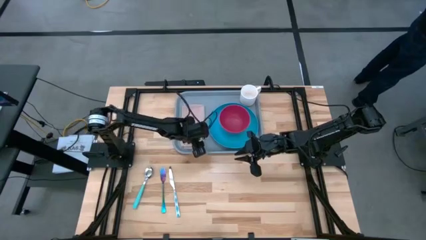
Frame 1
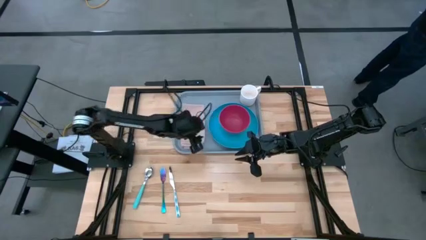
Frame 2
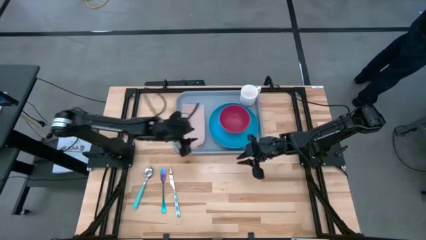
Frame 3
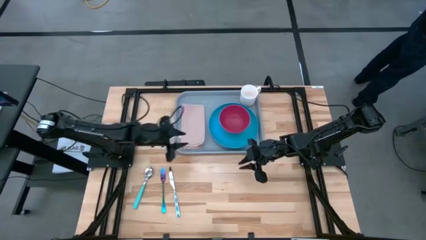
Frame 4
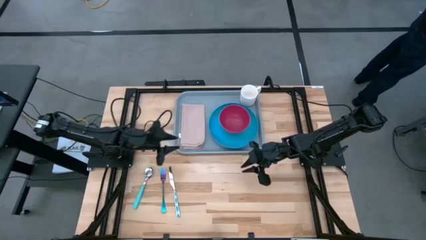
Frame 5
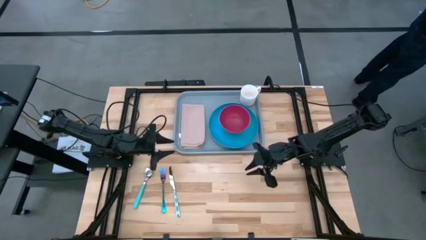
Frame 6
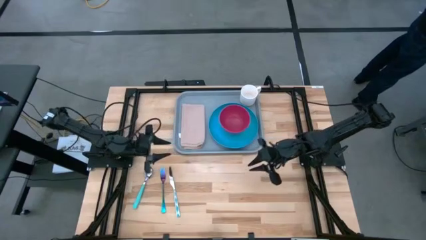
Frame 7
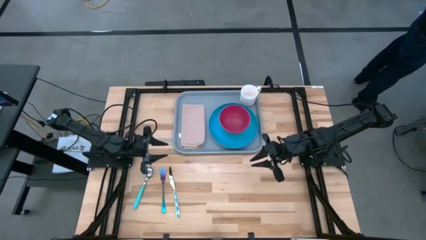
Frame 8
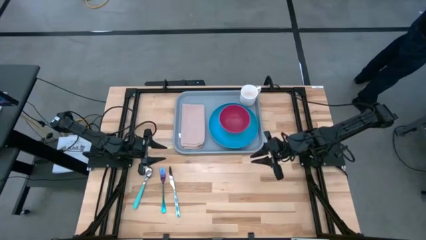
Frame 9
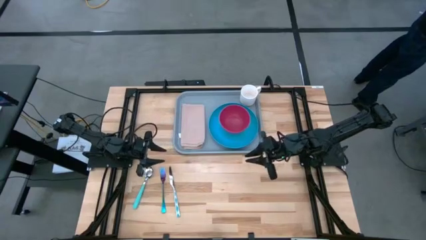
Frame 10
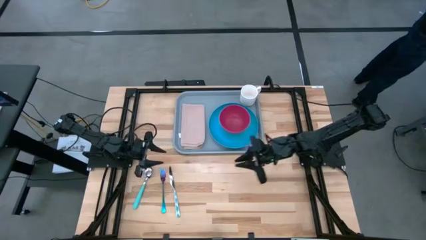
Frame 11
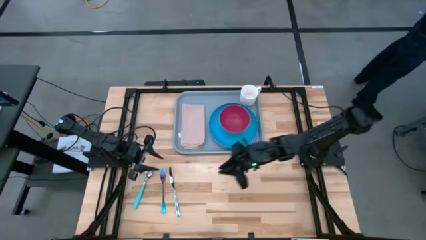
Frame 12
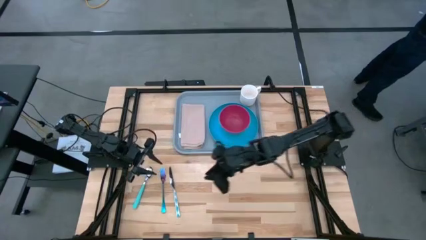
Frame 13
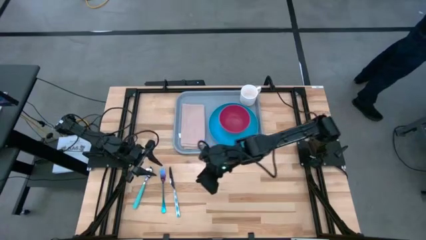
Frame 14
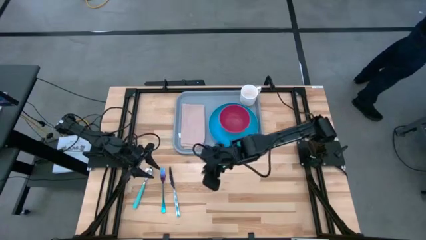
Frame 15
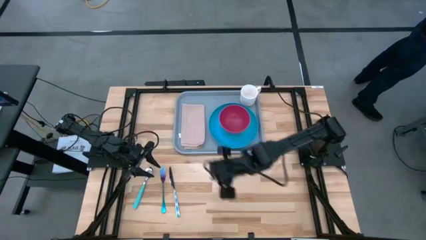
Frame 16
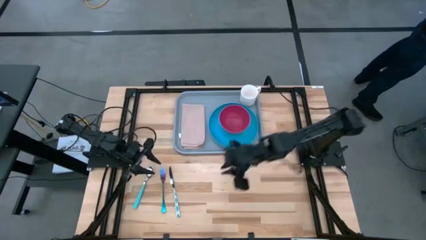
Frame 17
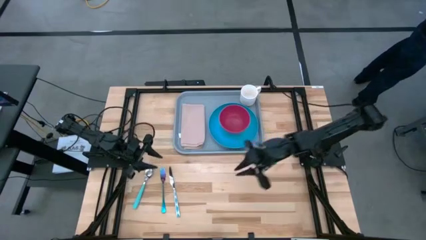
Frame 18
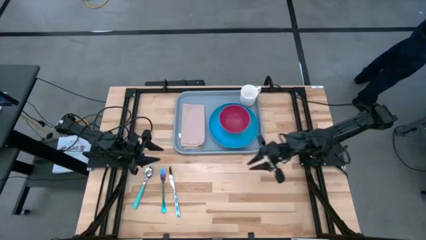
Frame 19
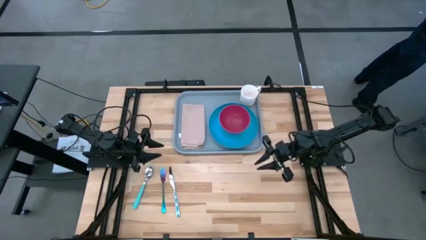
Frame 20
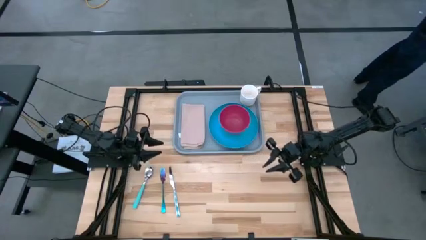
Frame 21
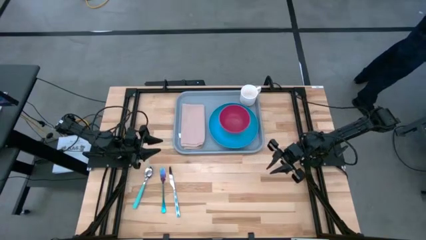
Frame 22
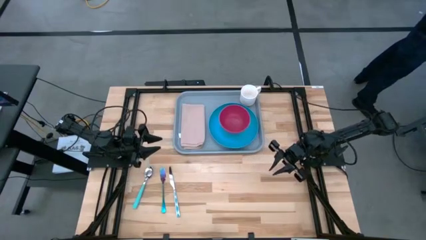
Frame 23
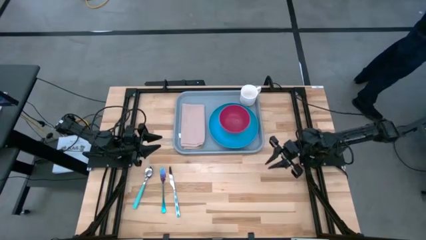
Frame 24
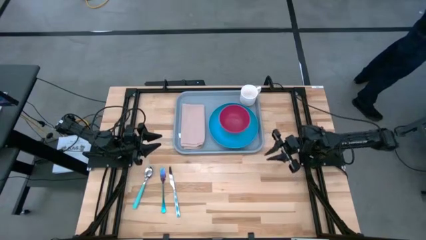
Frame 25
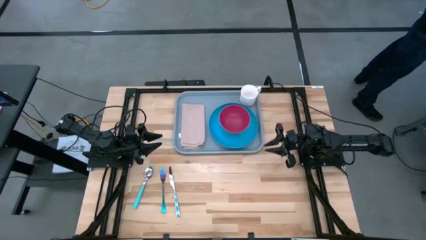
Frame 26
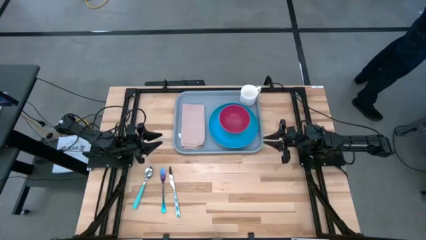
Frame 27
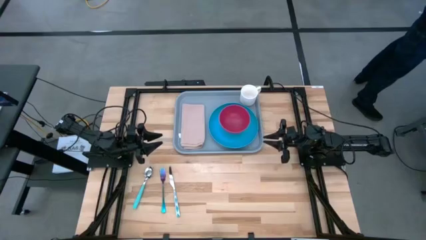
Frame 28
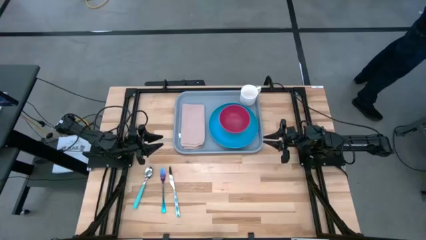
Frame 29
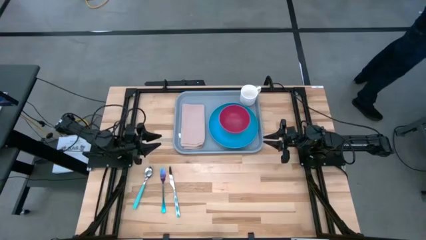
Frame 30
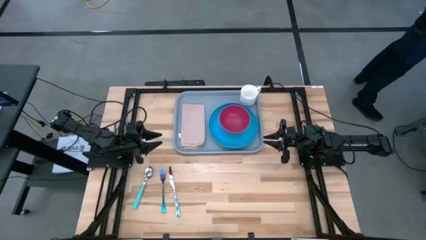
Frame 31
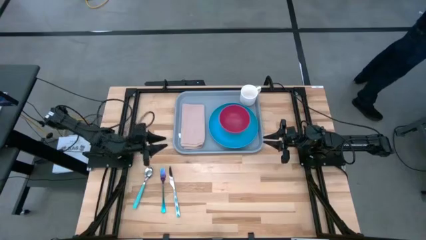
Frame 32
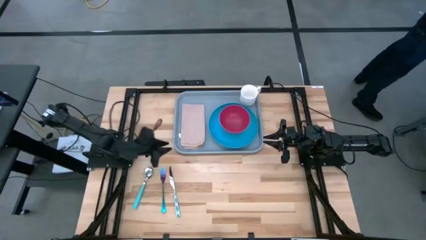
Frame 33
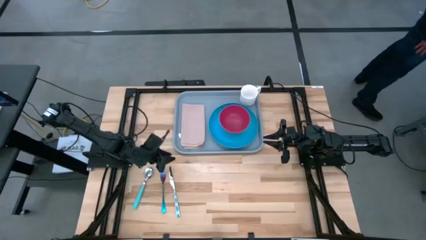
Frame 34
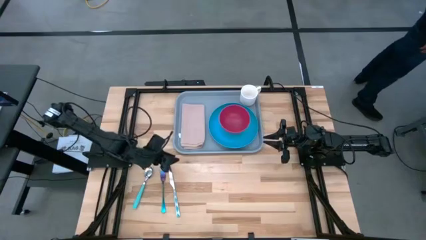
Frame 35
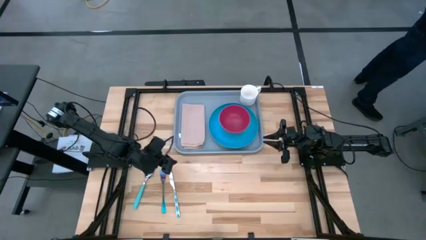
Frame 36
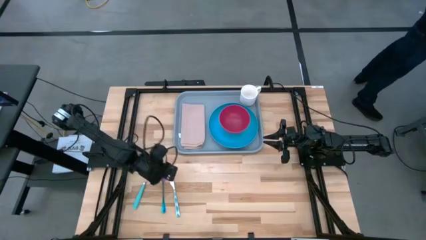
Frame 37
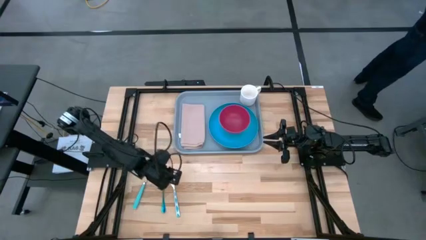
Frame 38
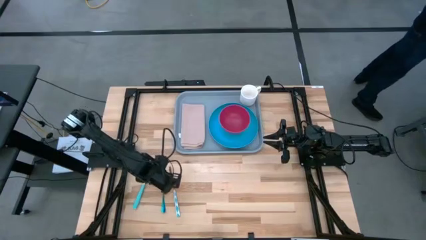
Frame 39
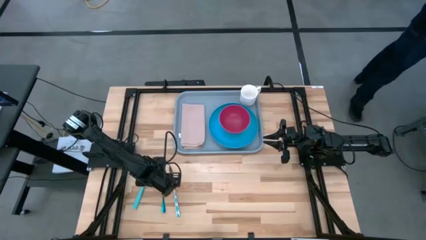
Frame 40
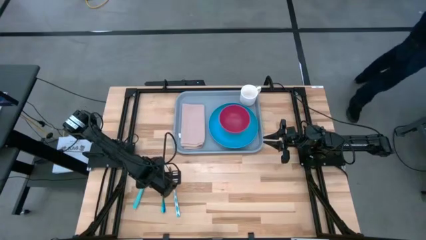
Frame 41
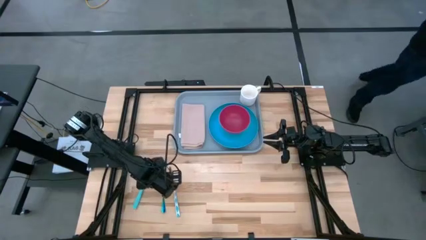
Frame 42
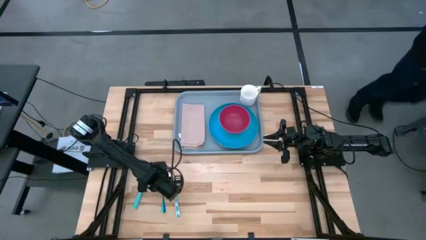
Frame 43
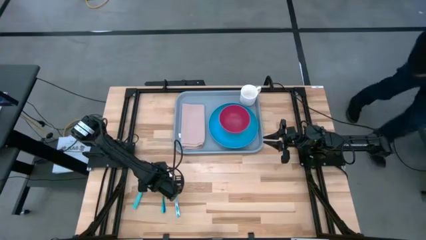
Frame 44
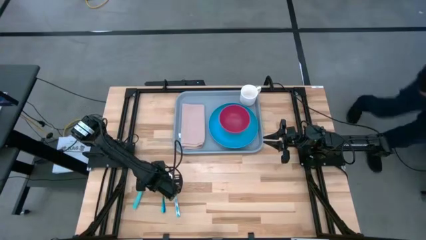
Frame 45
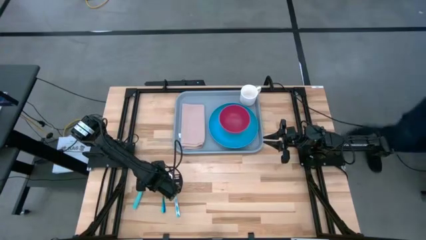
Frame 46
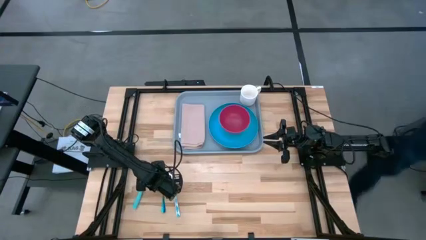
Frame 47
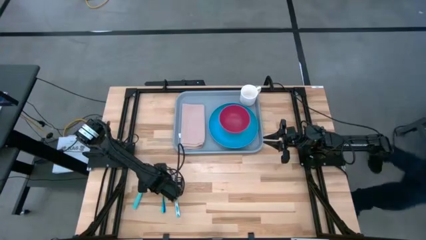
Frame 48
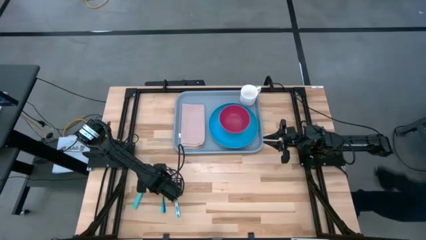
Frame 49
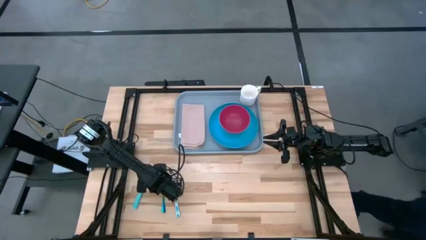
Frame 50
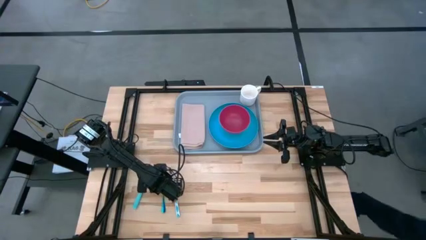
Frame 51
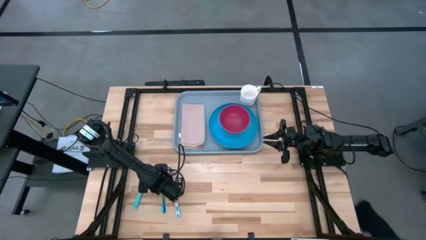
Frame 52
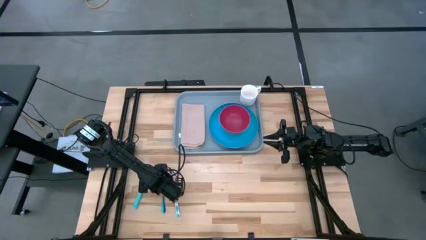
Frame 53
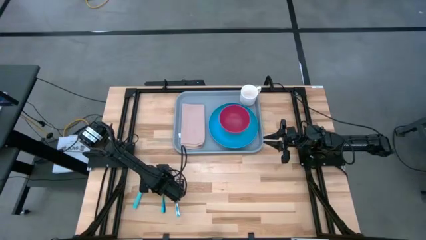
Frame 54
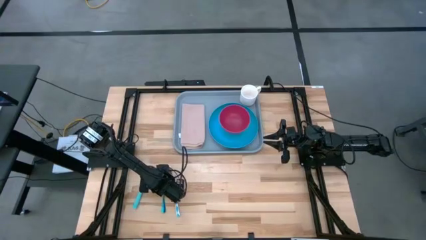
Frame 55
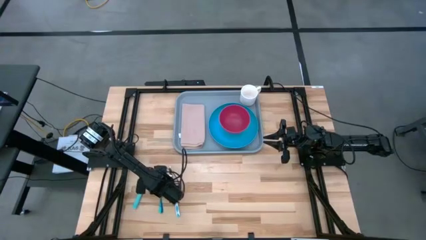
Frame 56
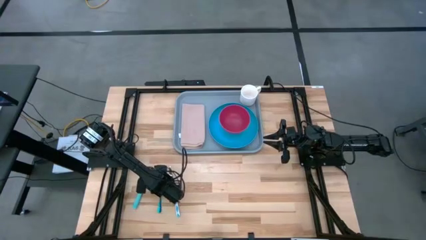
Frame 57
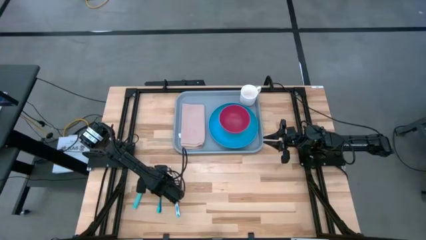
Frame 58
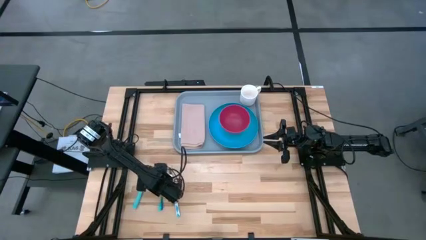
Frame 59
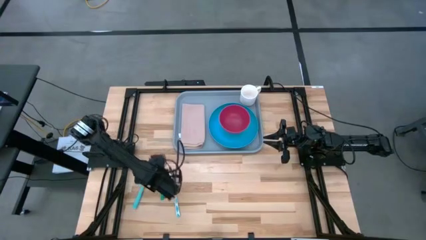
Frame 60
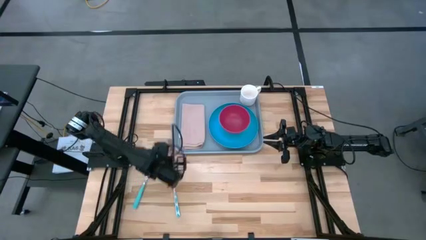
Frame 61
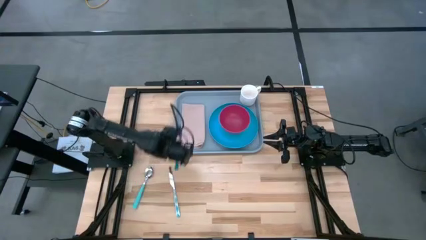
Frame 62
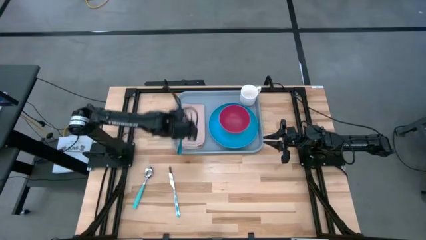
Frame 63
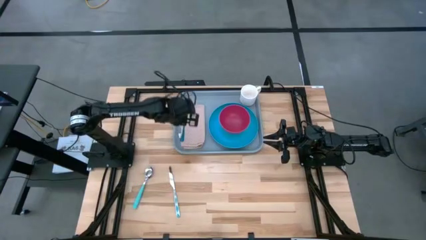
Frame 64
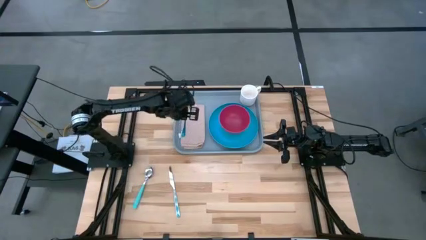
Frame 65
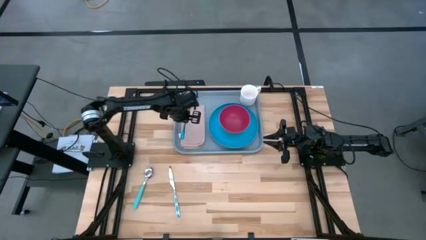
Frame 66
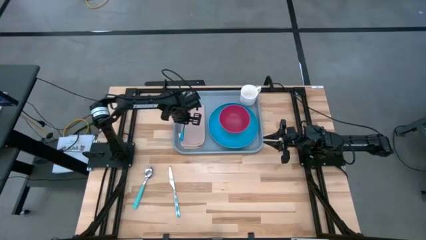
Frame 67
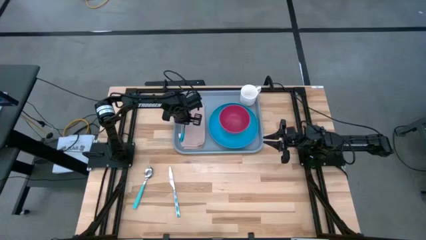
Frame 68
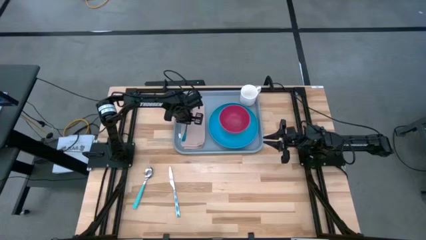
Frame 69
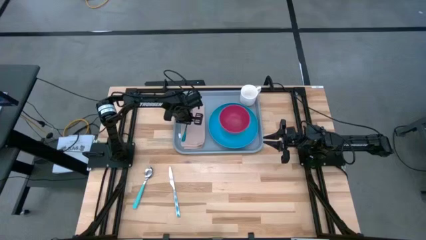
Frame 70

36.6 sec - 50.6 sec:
Task: Set up tray
Put the fork on the napkin on the serving tray

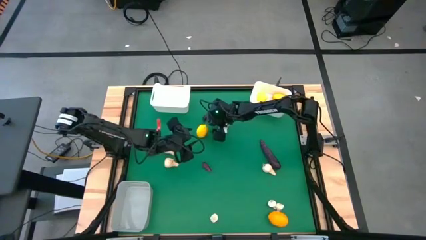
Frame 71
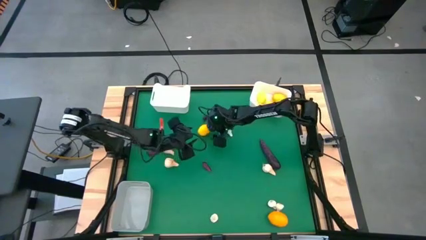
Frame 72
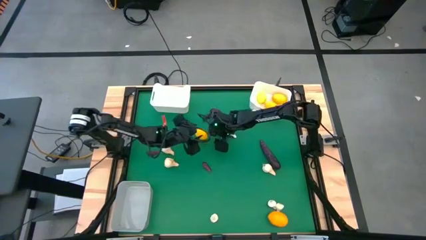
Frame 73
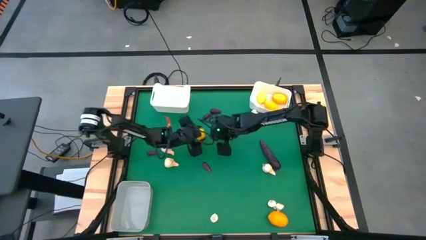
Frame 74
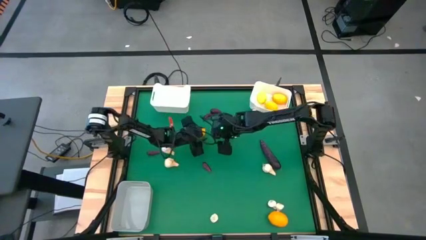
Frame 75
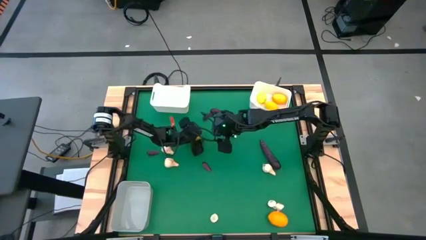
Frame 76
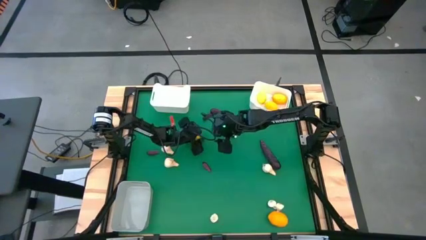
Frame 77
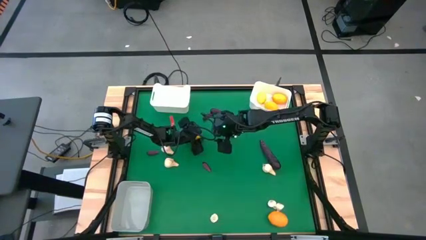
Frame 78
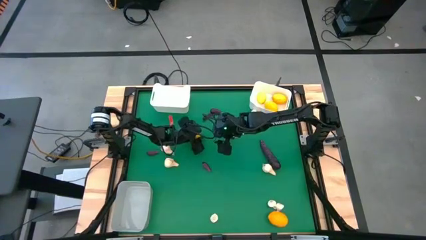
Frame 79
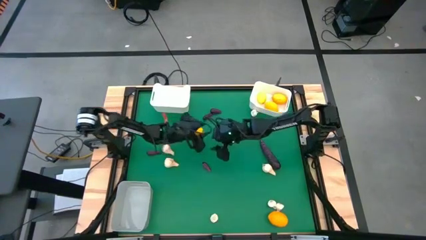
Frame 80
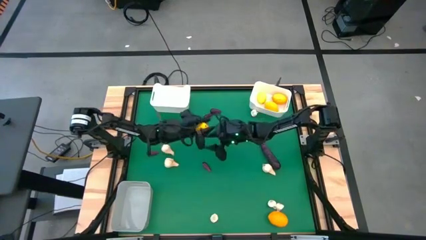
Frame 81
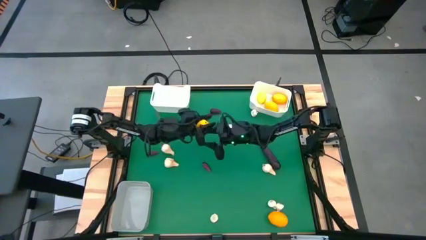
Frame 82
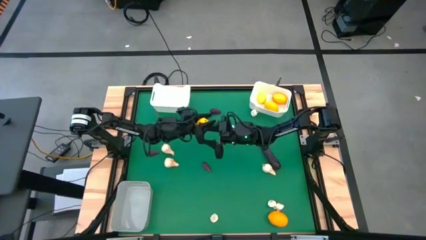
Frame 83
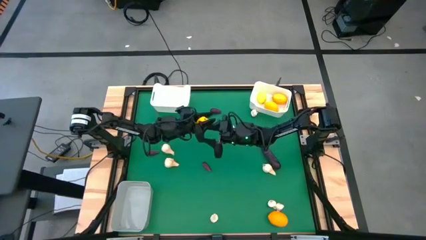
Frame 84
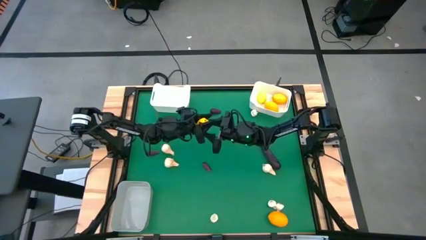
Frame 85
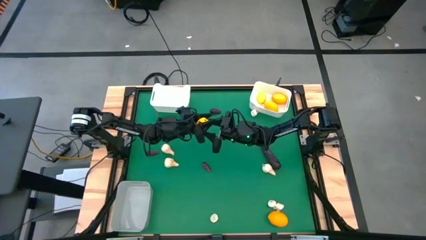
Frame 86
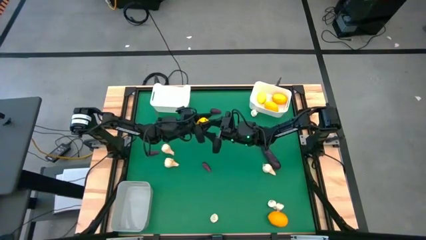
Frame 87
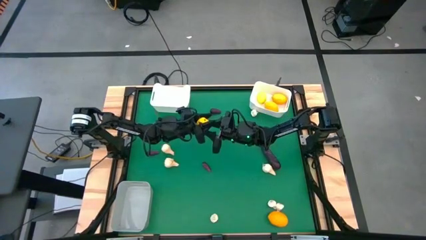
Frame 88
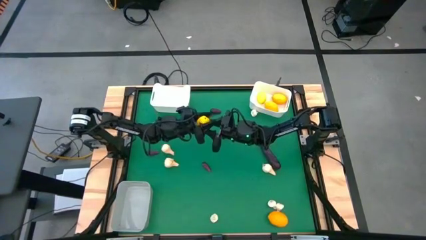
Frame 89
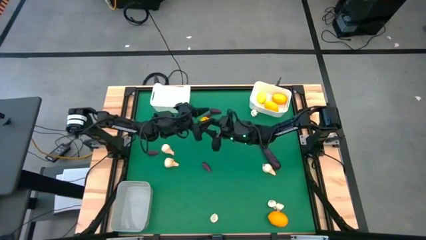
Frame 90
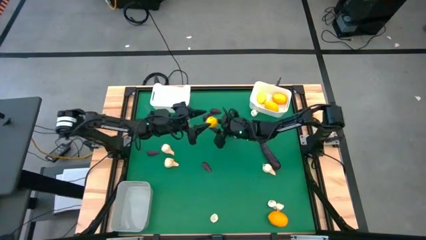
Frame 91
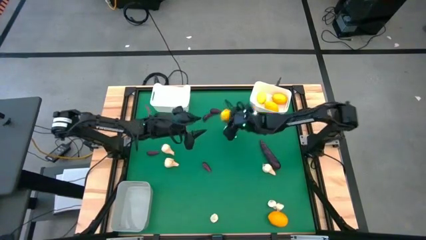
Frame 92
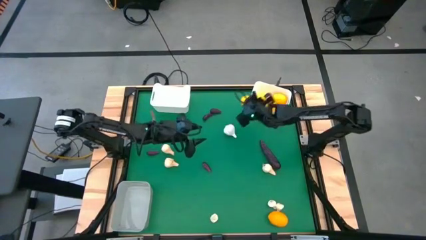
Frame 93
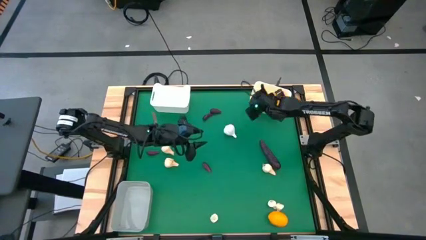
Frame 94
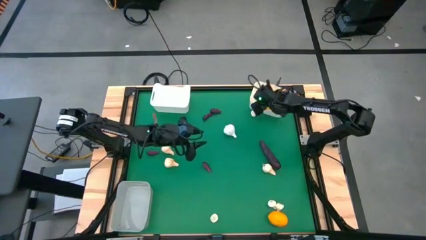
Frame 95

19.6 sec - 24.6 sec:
Task: Sort produce into baskets
Put the top yellow lemon into the white right bin
